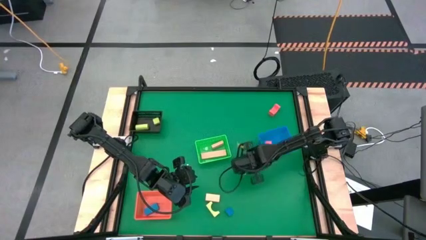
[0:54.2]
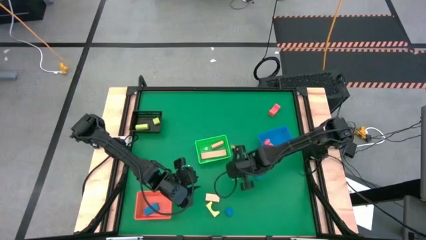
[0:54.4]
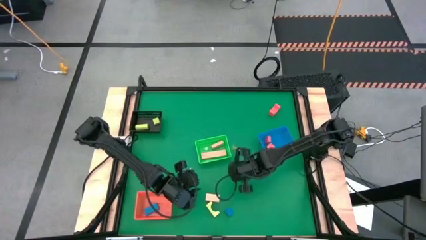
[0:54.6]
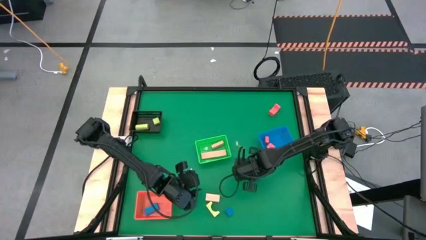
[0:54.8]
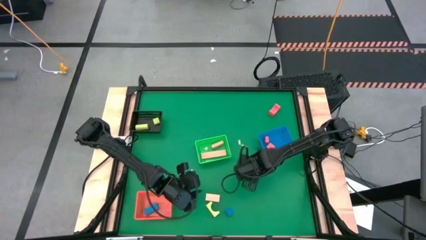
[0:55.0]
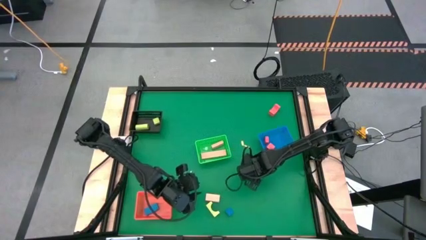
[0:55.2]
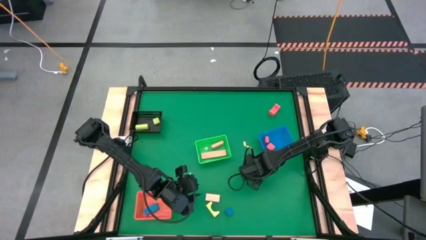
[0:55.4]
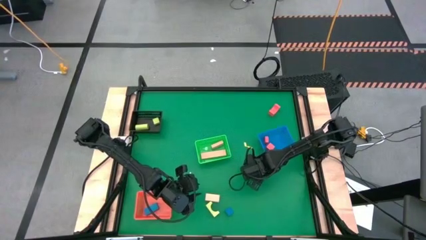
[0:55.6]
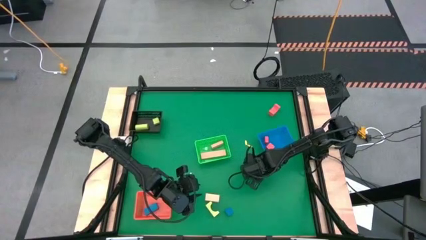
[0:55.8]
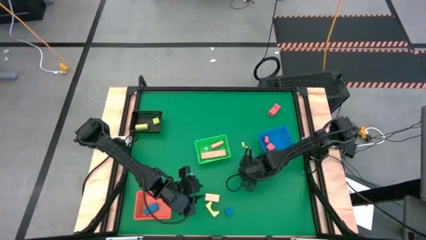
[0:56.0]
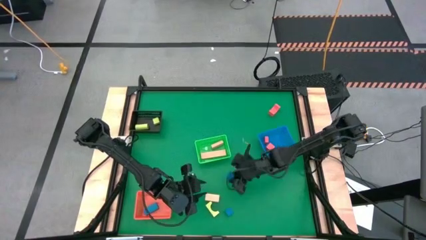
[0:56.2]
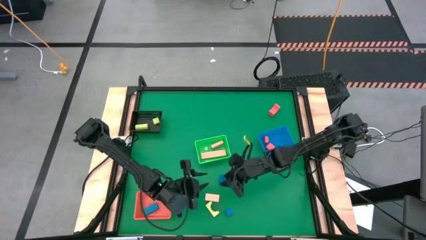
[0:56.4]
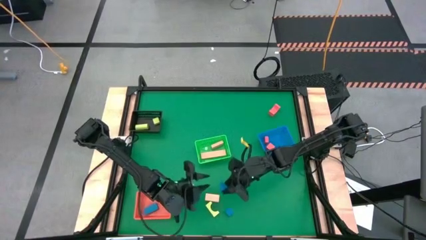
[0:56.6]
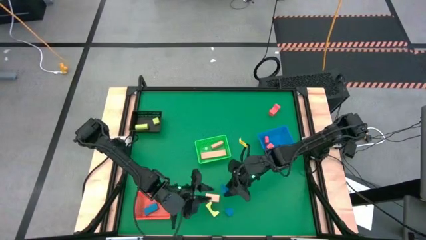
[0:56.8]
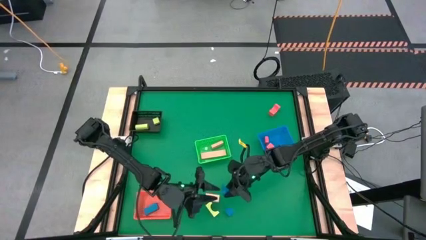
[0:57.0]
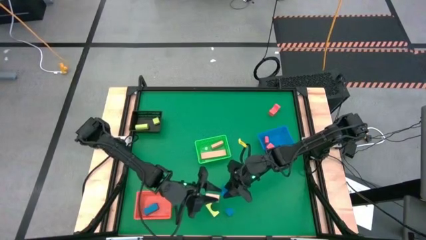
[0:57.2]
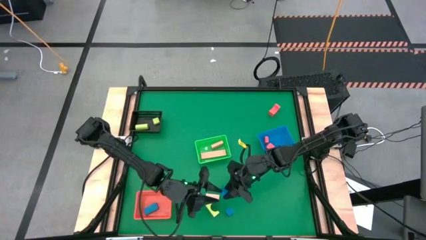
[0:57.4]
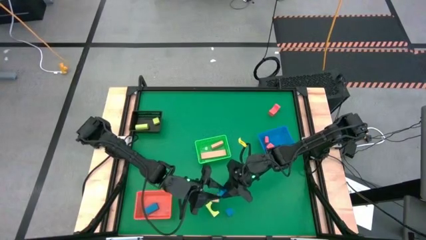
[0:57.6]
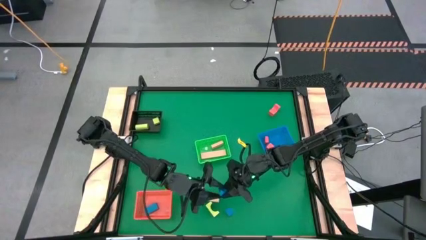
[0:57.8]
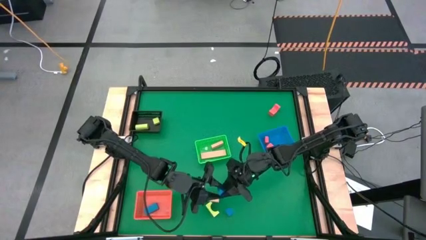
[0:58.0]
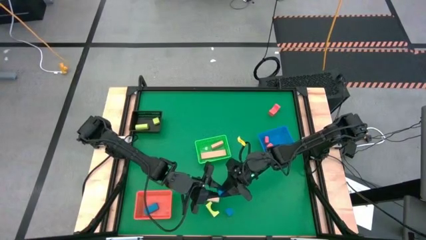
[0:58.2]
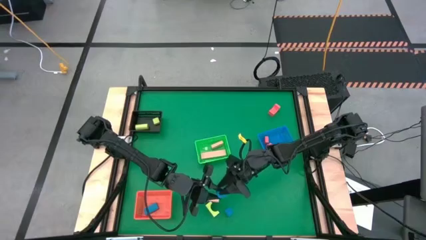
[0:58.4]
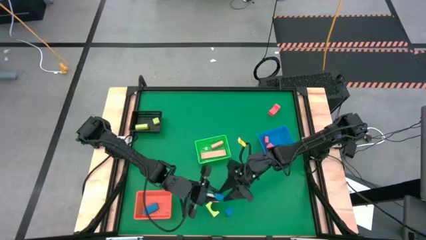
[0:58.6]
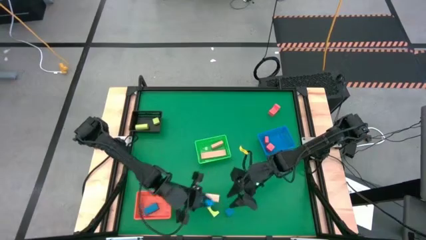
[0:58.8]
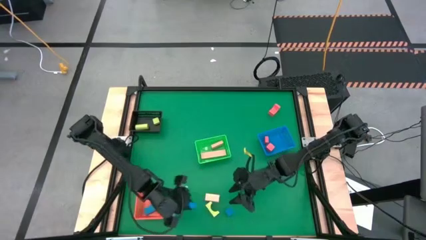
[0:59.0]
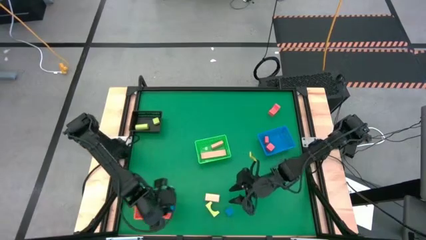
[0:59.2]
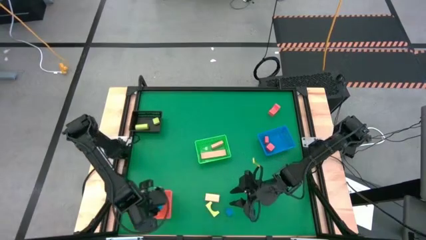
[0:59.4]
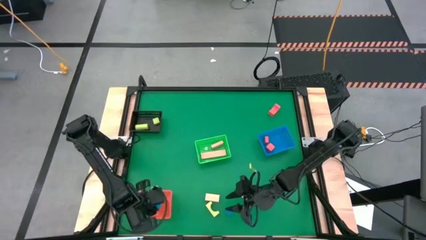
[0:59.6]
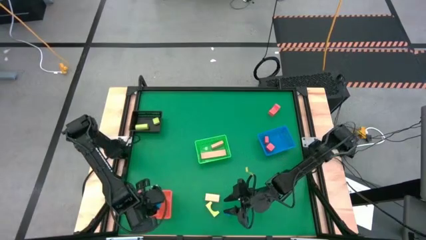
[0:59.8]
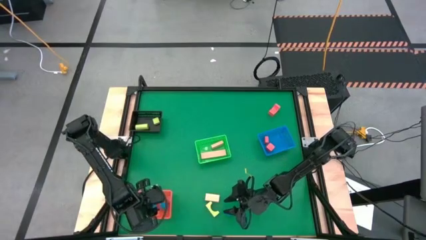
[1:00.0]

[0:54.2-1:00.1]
Task: Sort & place blocks by color
Put the top blue block into the red bin

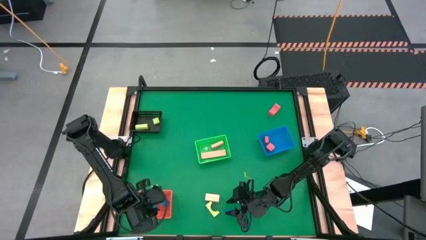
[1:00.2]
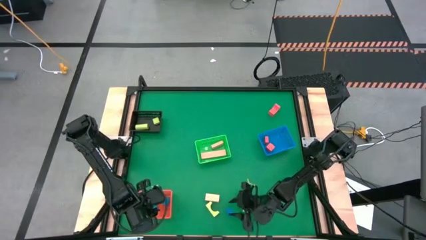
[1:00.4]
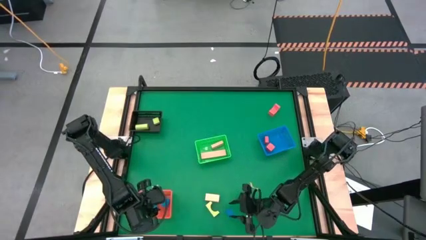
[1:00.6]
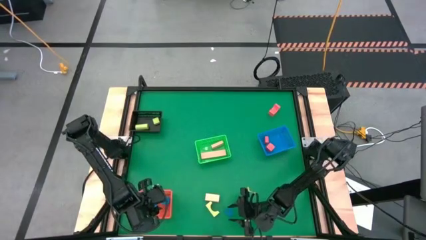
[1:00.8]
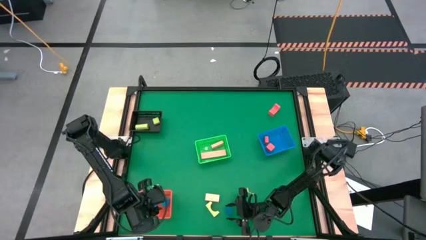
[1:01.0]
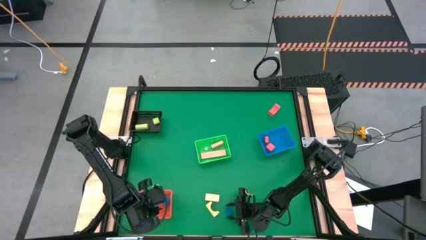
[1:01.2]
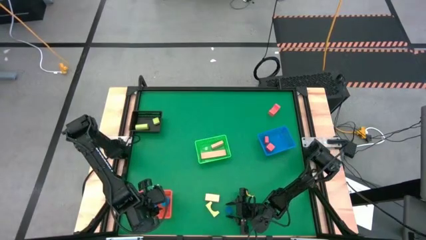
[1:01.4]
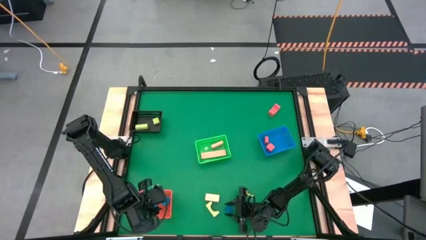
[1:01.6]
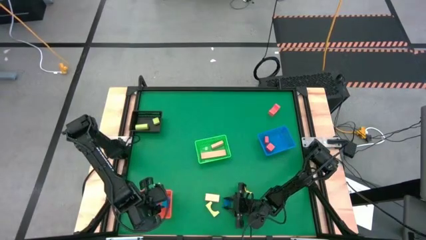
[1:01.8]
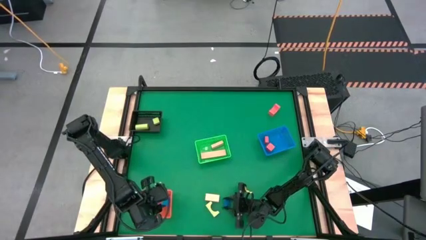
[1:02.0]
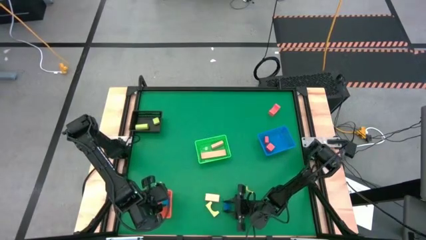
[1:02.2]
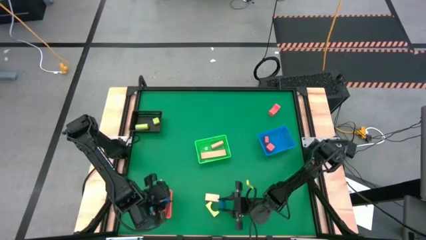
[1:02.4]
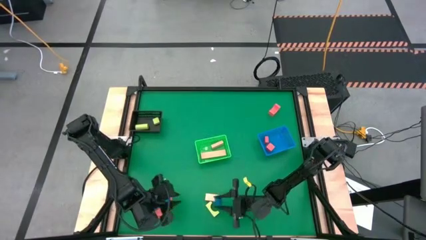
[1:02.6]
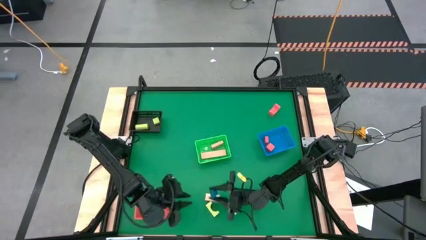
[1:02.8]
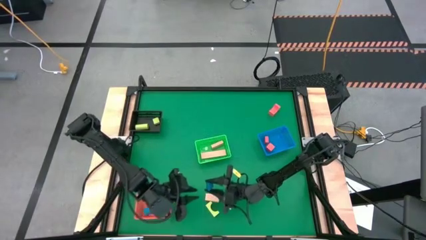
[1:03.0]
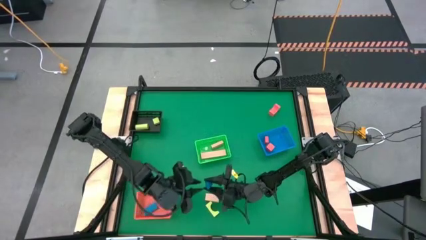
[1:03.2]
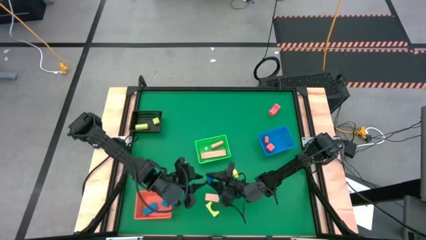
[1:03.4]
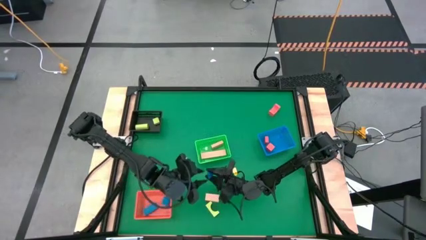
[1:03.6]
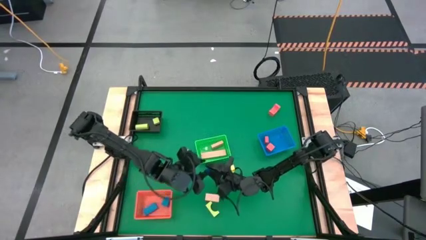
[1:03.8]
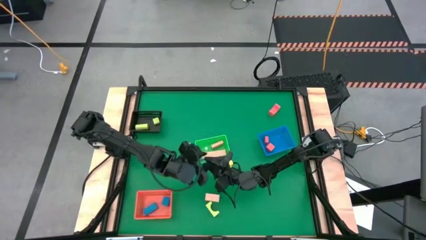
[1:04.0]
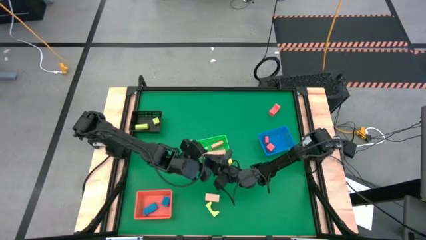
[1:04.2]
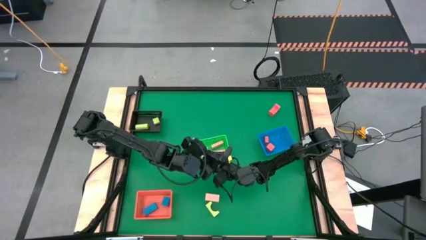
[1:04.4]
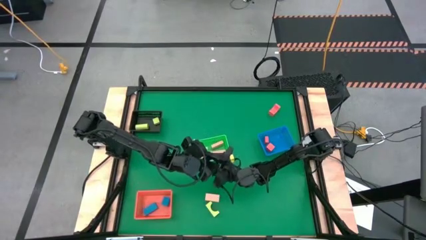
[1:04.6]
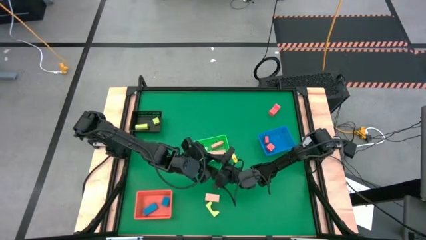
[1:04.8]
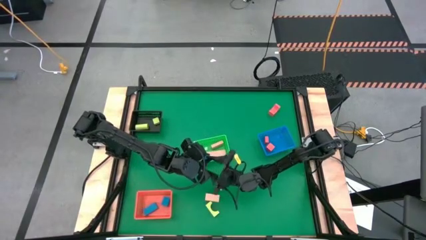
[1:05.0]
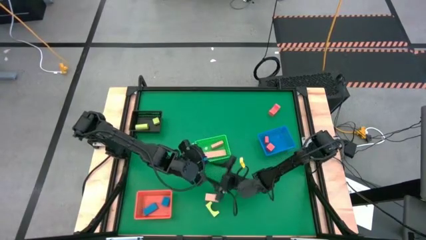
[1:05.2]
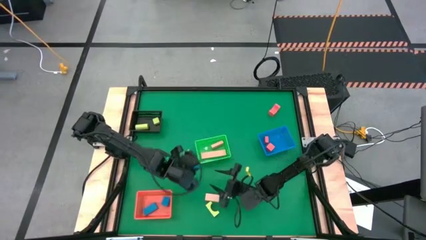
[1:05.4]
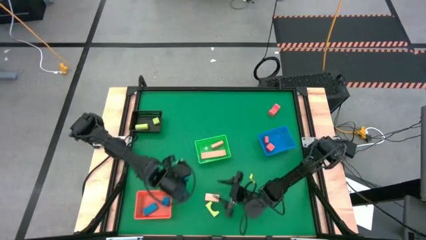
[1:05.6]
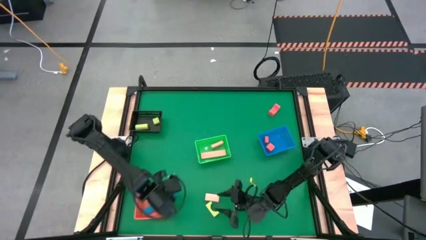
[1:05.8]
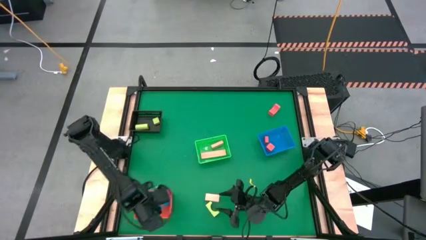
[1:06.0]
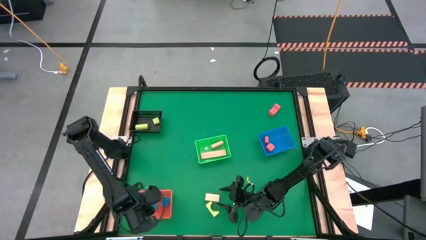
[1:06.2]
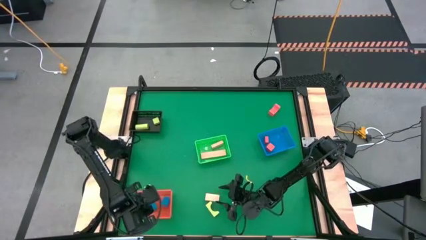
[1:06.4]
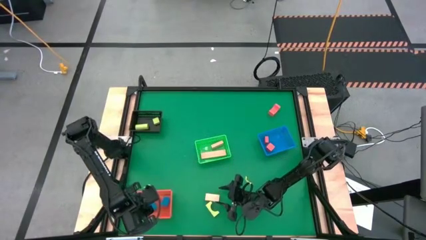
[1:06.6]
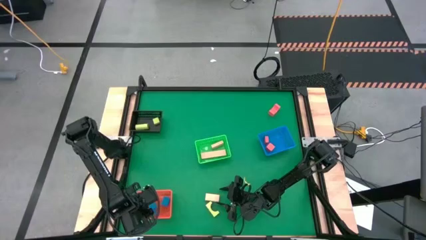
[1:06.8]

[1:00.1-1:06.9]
Put the blue block into the red bin

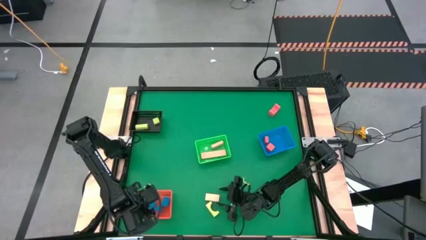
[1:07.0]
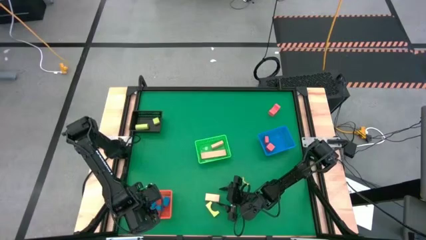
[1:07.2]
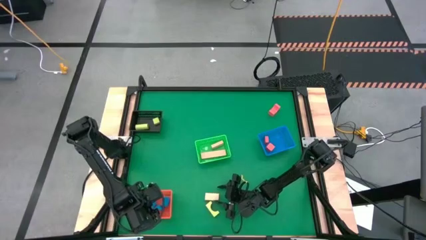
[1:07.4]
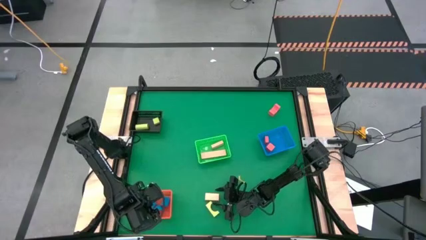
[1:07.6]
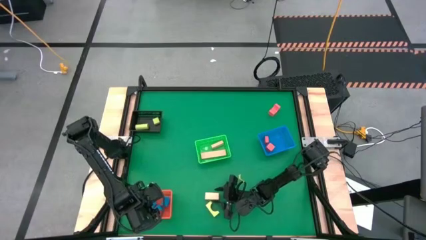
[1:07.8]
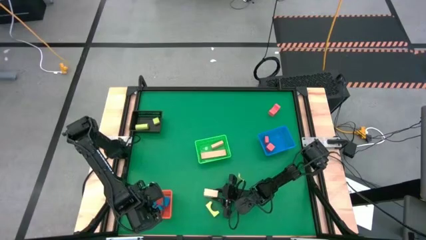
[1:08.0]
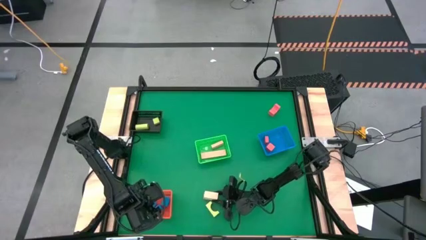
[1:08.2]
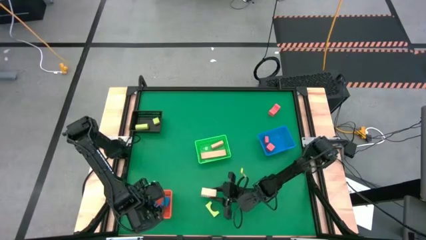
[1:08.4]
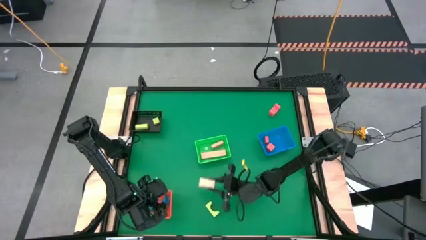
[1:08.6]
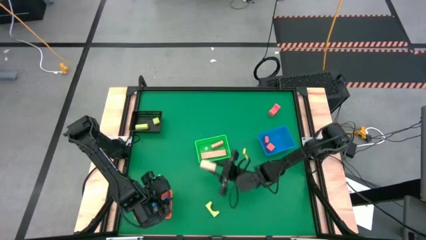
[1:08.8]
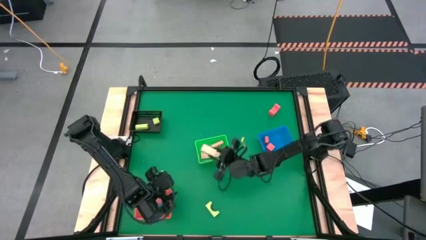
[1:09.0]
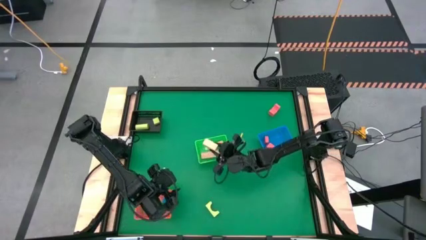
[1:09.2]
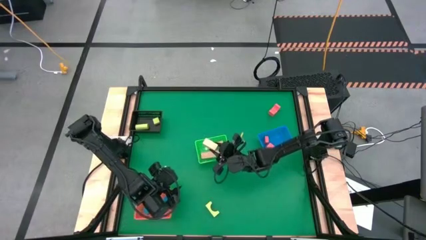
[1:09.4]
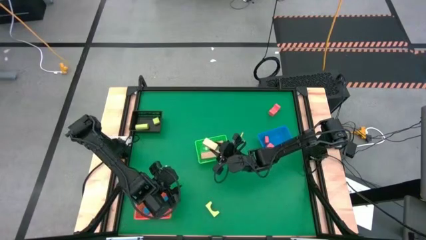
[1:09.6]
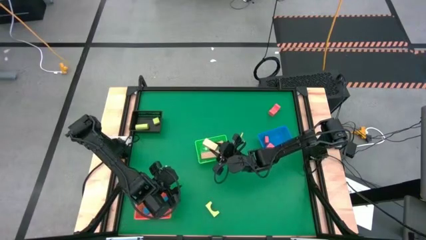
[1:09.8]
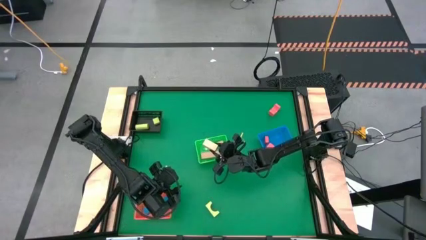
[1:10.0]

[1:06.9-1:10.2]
Put the light brown block into the green bin
